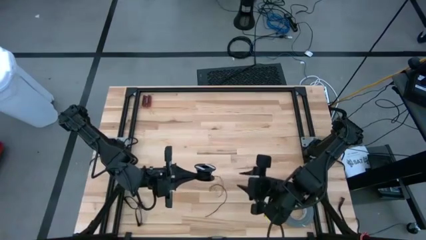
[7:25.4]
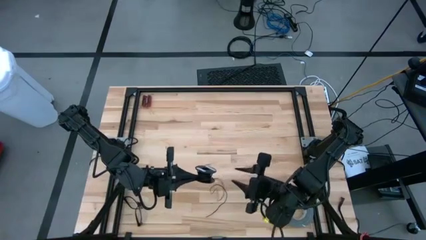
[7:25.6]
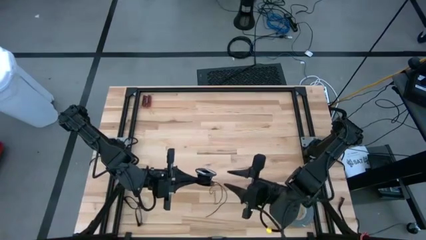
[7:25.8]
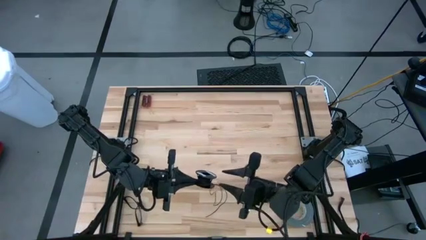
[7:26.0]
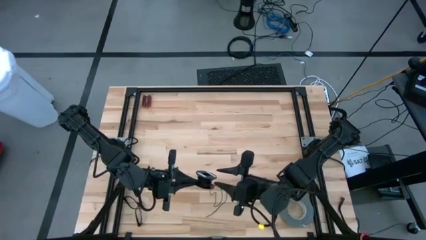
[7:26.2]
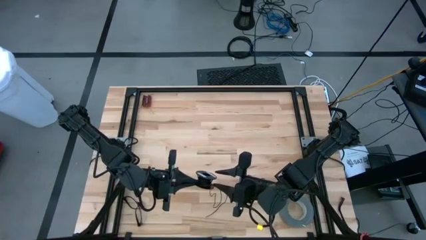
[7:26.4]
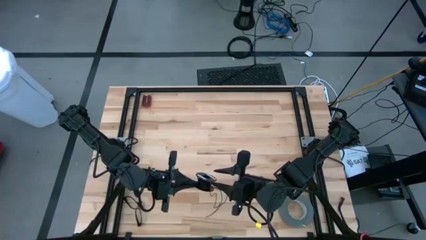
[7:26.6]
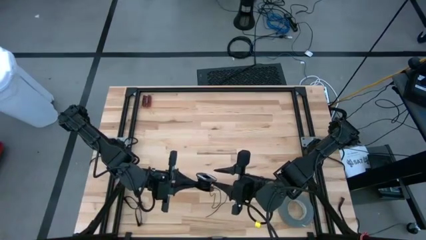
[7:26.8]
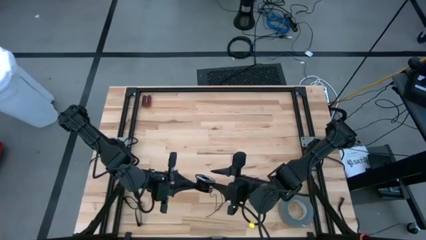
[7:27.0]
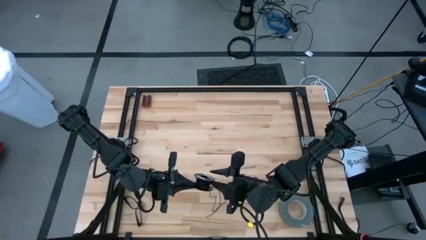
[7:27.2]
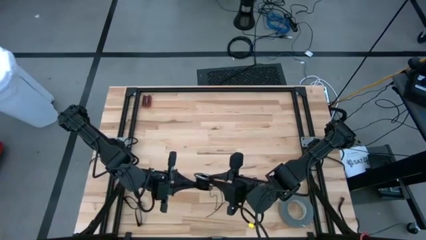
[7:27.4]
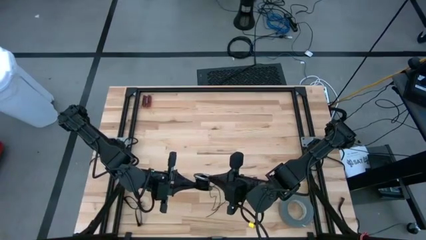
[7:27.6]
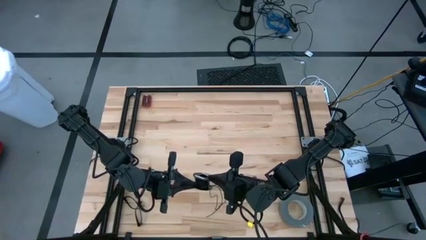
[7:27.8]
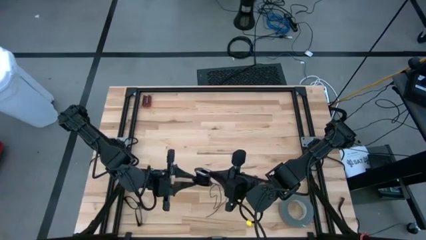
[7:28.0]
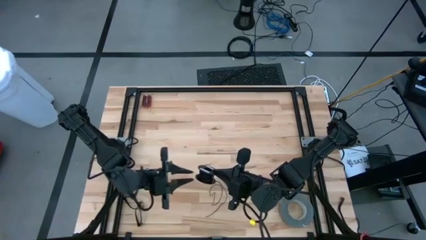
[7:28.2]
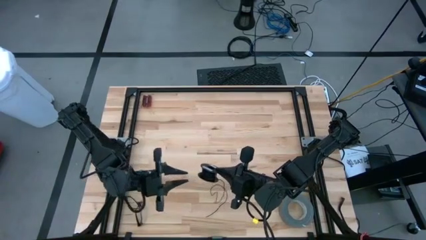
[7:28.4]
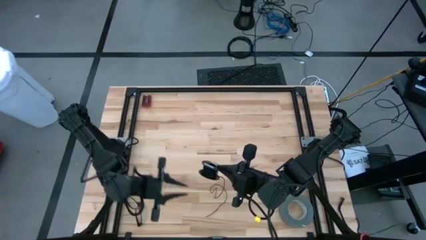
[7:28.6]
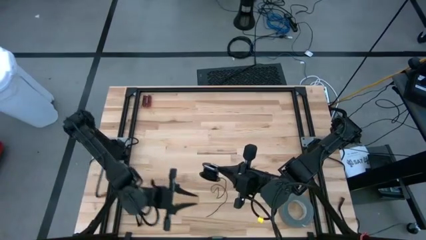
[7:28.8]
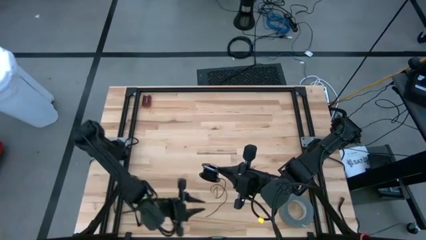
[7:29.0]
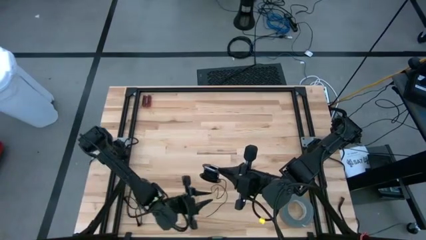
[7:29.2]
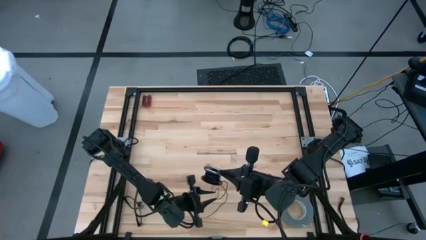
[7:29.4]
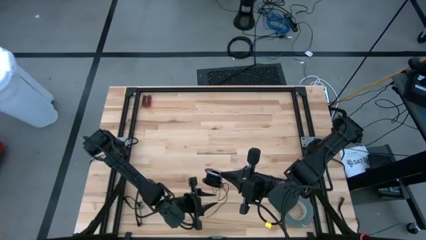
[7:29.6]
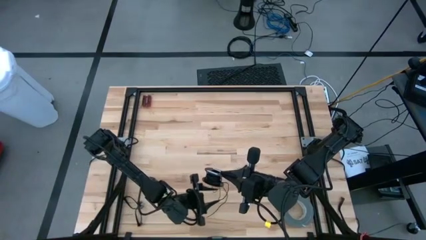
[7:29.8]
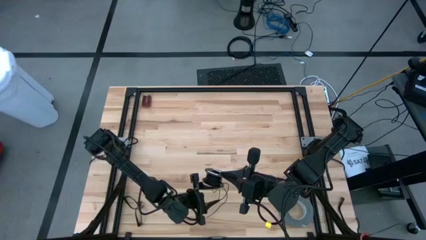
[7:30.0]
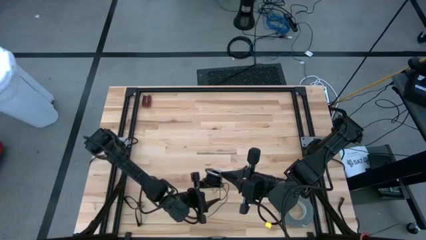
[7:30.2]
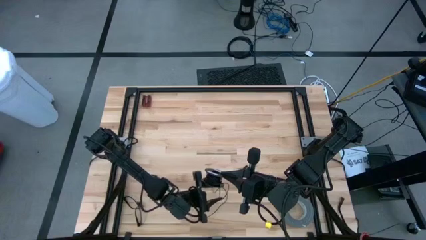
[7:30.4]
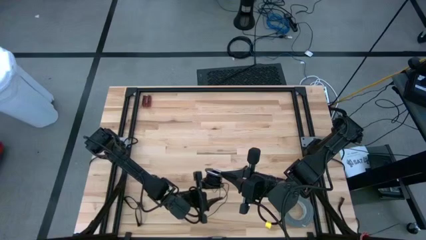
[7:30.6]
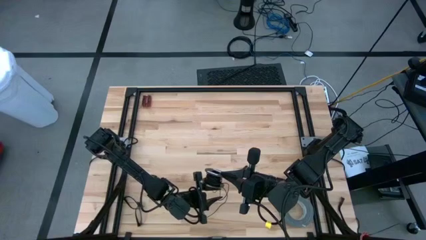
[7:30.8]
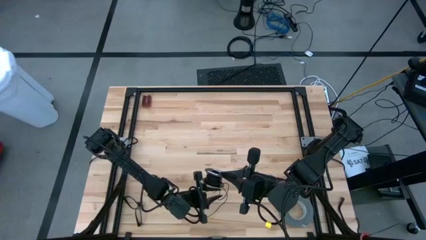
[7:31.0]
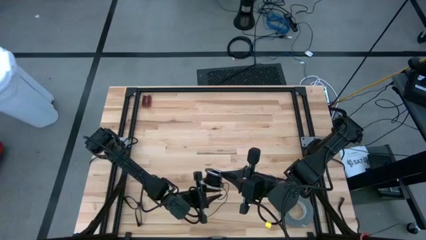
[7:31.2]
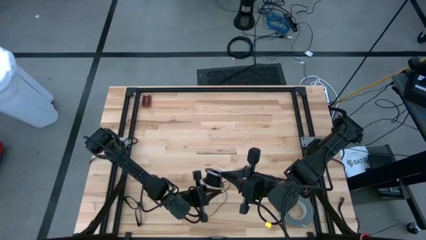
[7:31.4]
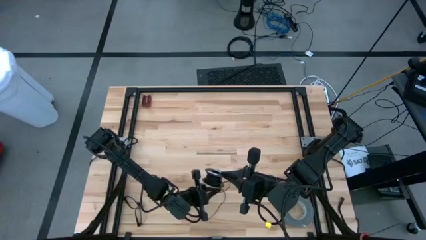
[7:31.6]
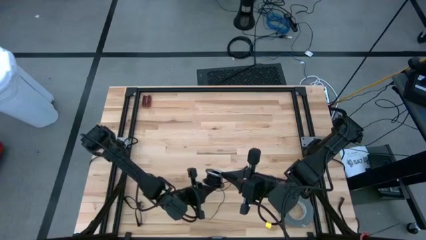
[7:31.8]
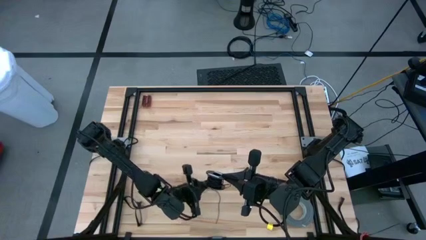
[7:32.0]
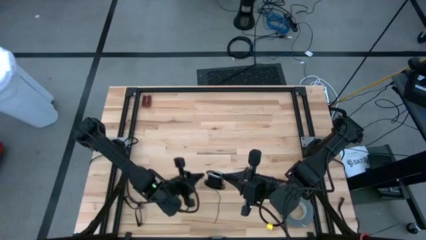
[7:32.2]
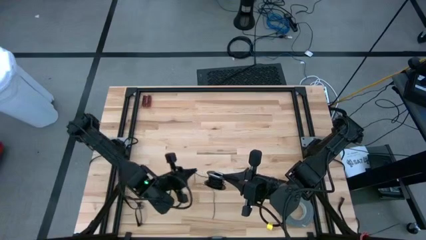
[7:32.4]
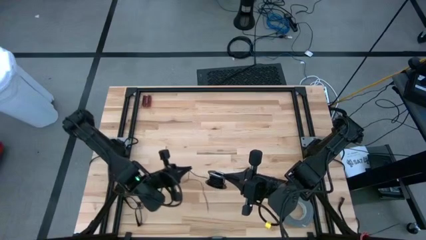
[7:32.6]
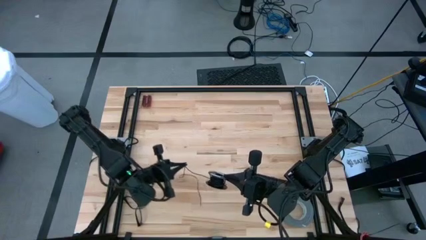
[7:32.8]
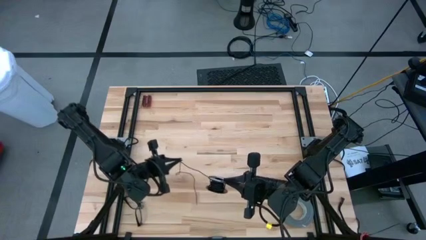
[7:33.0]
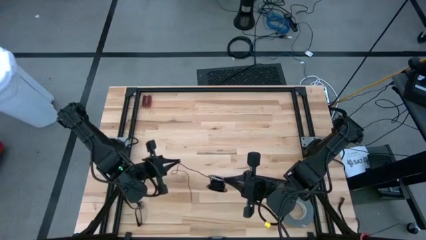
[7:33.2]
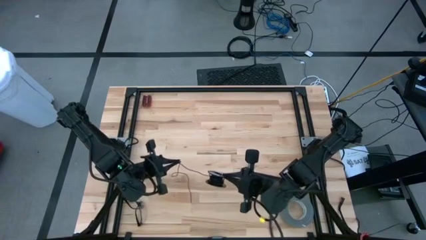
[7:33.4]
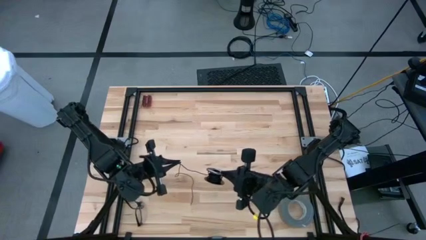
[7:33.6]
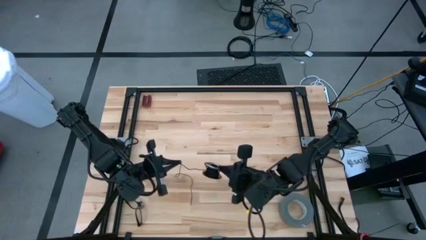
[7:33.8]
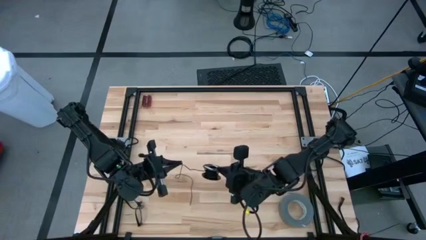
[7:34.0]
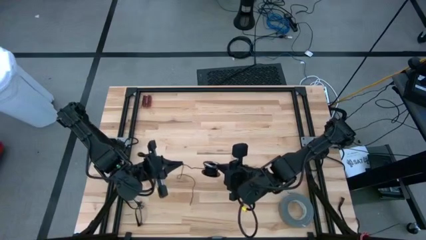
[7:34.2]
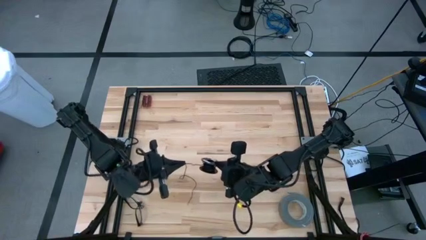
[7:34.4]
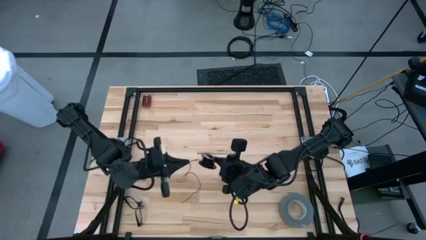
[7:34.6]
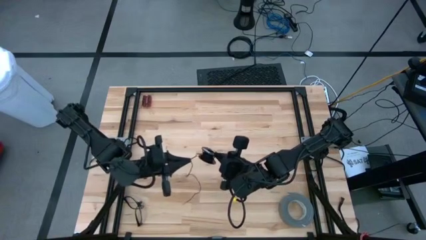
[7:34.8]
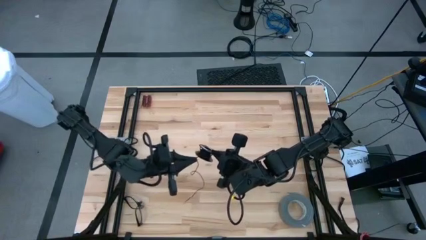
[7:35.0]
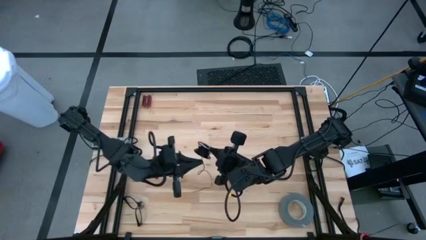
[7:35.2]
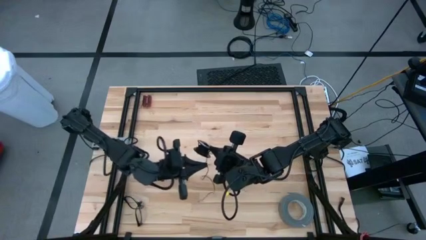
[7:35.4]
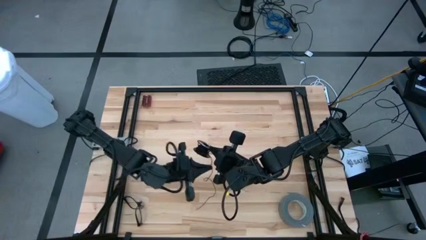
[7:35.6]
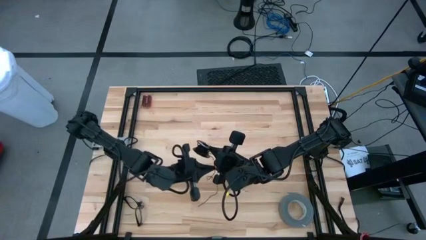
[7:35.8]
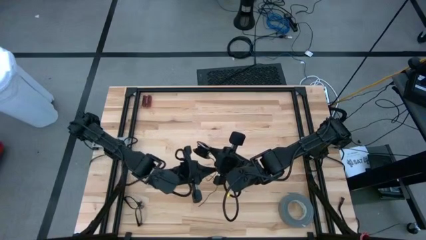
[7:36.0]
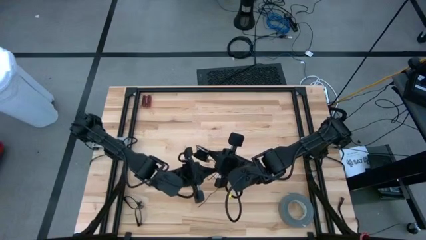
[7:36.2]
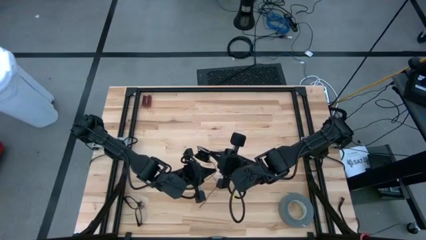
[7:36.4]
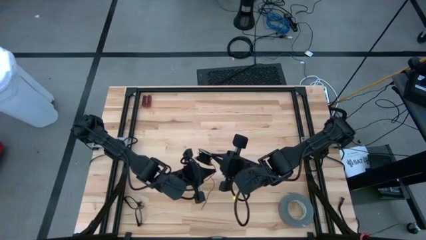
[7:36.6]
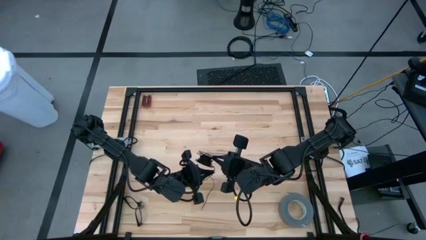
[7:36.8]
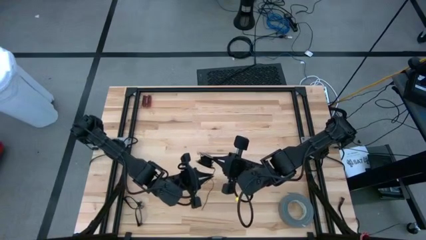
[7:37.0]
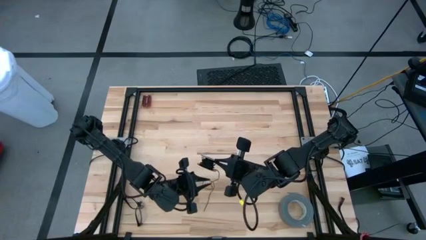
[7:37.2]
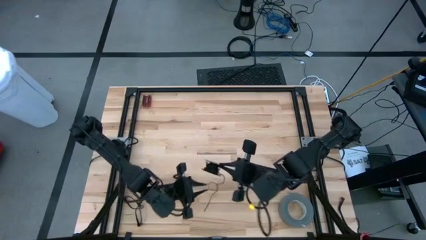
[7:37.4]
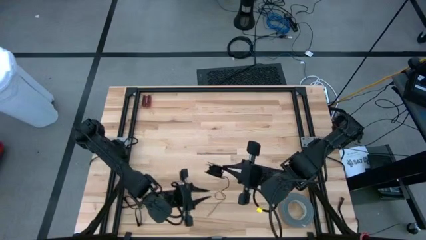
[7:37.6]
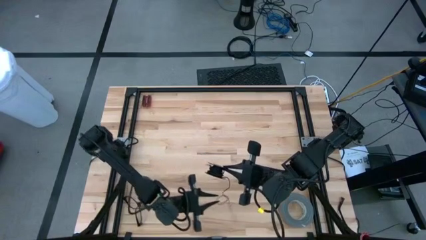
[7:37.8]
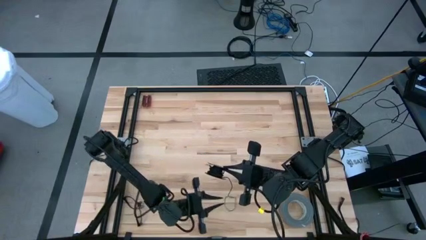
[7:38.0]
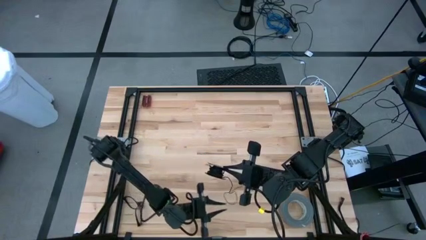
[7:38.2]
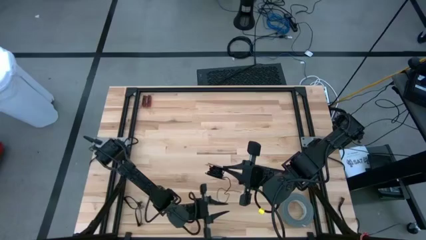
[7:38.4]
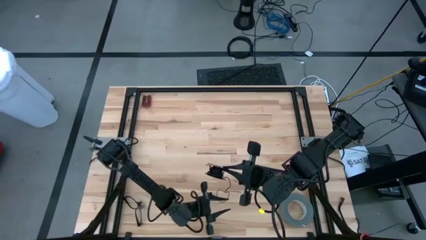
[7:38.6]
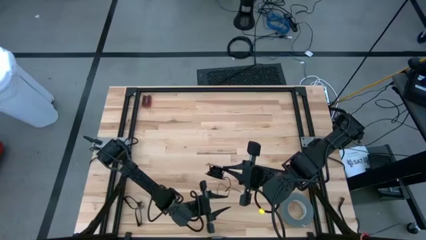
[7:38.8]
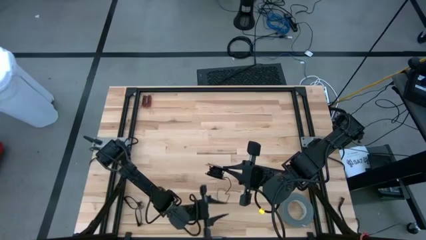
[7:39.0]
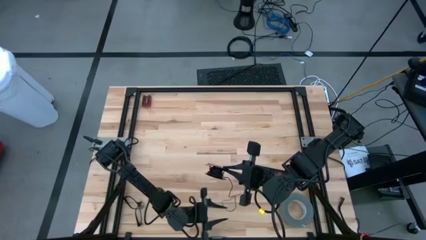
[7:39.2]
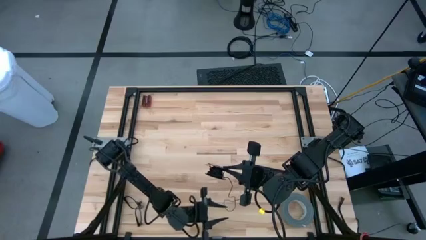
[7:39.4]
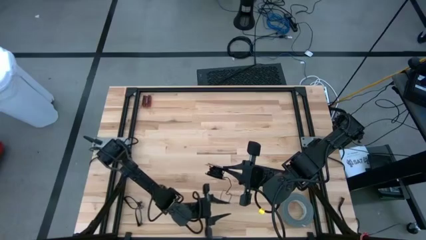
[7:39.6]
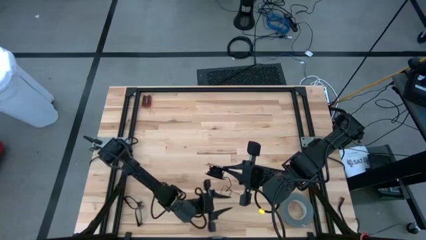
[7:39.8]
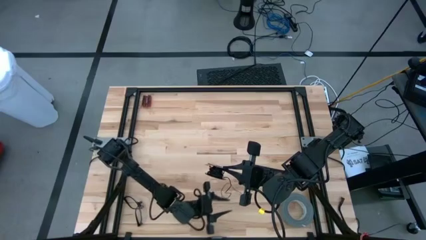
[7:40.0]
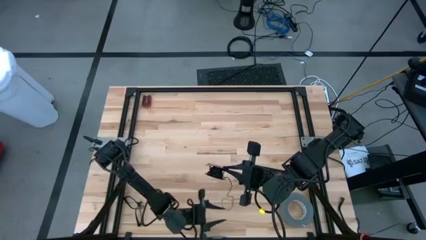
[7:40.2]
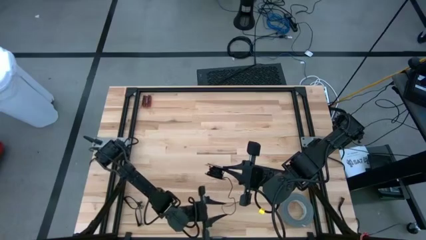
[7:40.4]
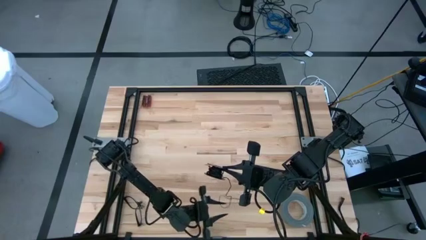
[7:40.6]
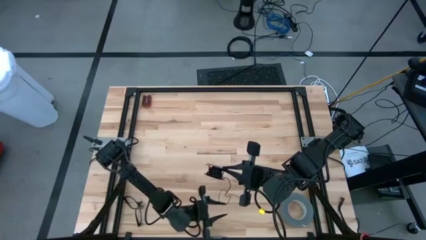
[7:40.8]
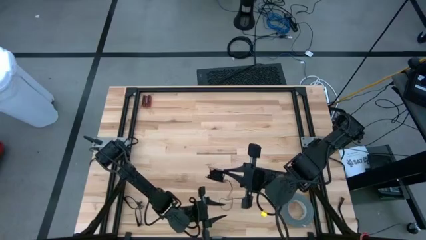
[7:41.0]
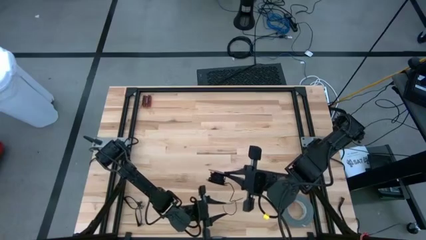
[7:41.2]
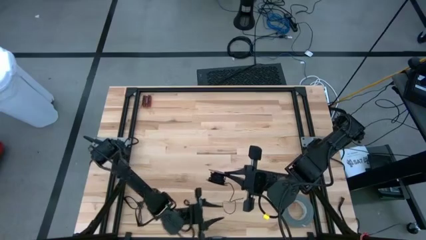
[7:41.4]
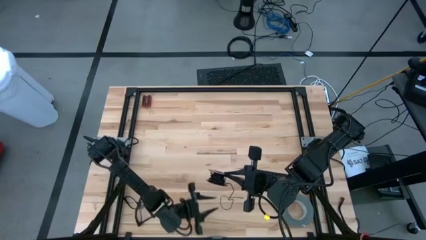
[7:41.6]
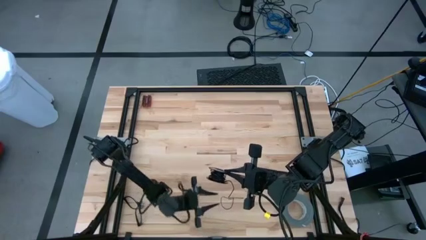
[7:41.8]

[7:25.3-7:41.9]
Task: Coil cords
Coil the black wire on the spool
